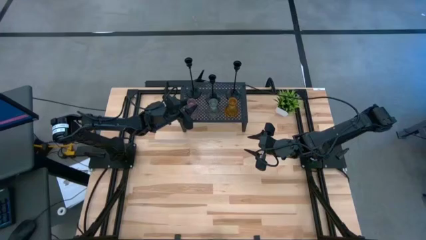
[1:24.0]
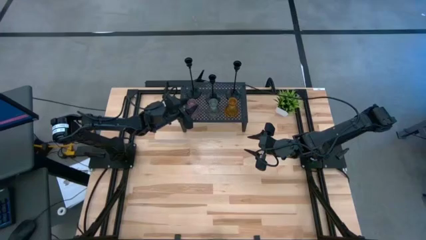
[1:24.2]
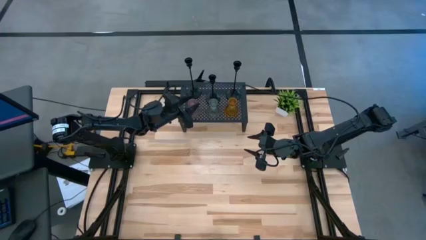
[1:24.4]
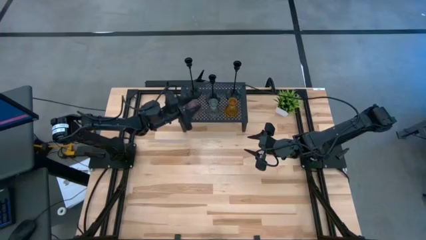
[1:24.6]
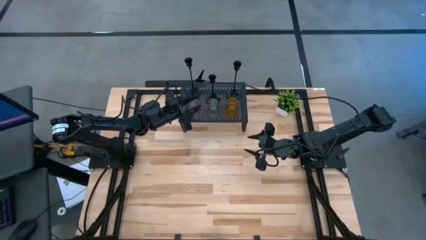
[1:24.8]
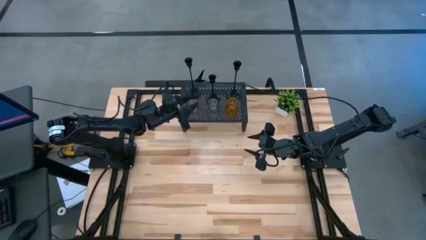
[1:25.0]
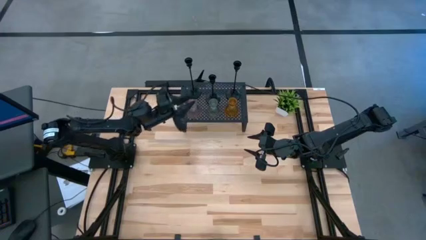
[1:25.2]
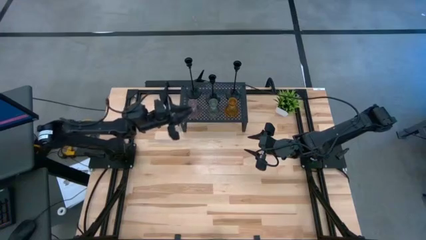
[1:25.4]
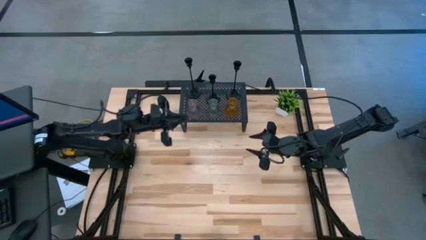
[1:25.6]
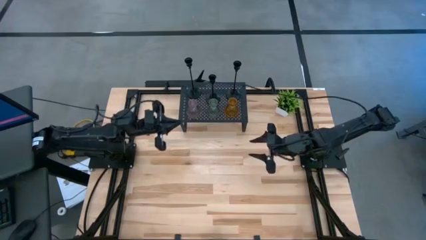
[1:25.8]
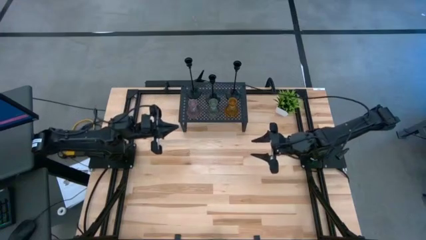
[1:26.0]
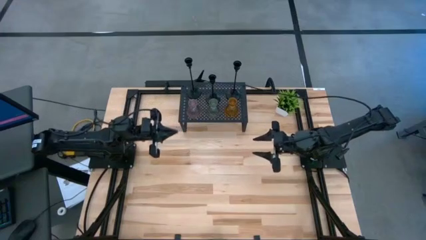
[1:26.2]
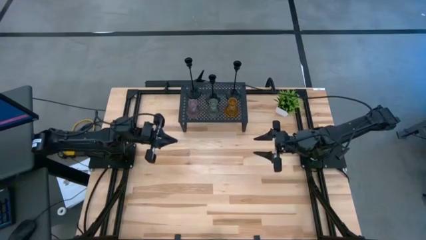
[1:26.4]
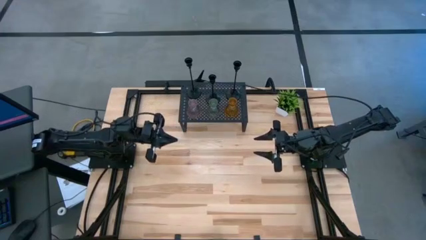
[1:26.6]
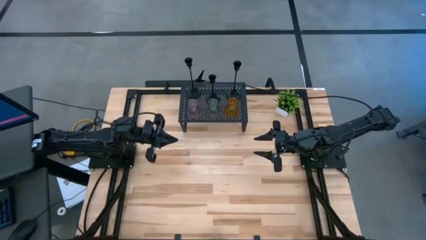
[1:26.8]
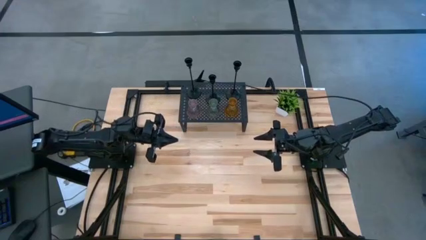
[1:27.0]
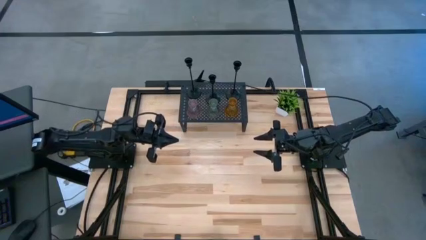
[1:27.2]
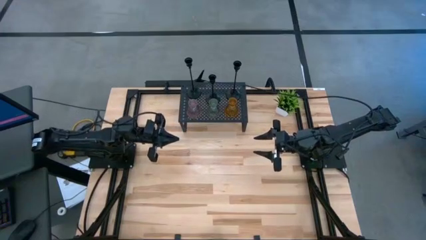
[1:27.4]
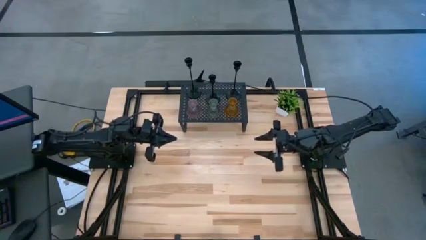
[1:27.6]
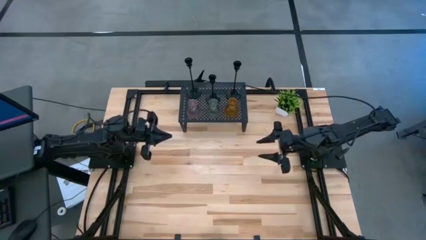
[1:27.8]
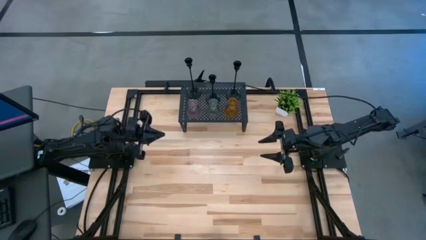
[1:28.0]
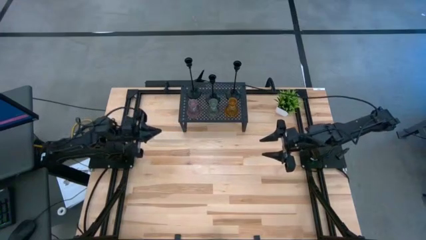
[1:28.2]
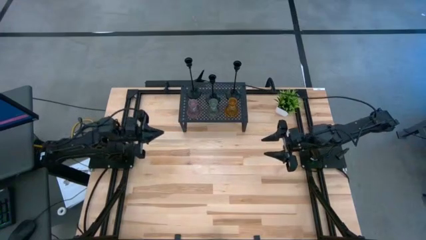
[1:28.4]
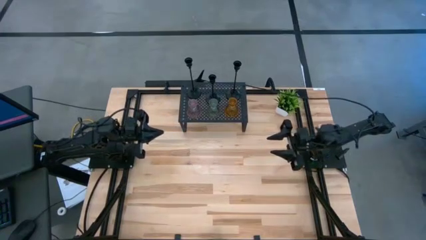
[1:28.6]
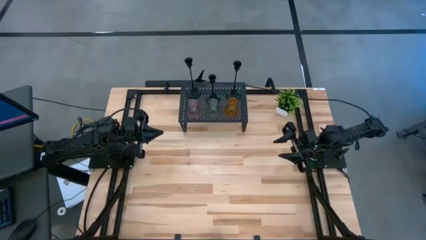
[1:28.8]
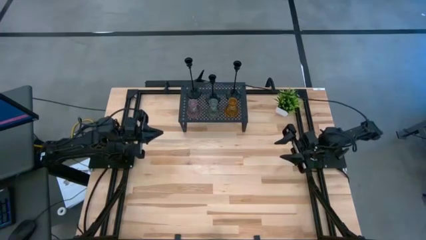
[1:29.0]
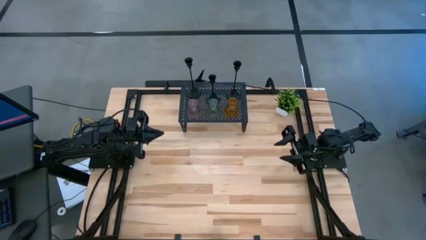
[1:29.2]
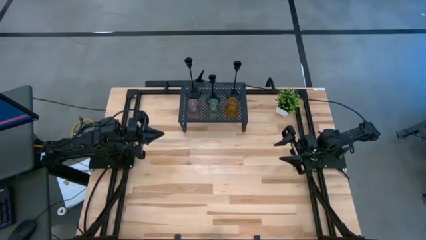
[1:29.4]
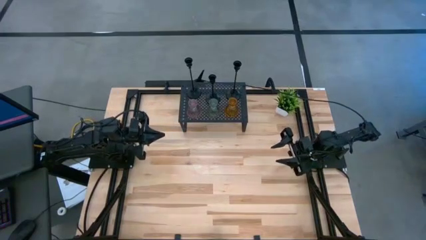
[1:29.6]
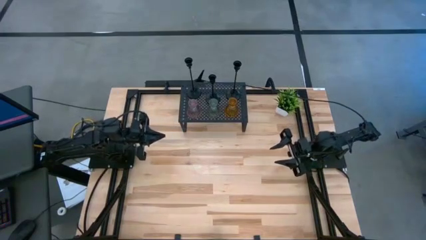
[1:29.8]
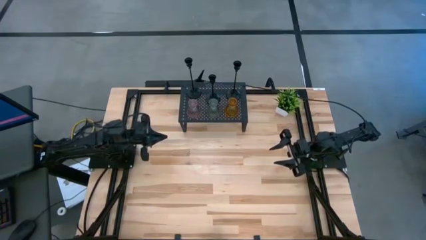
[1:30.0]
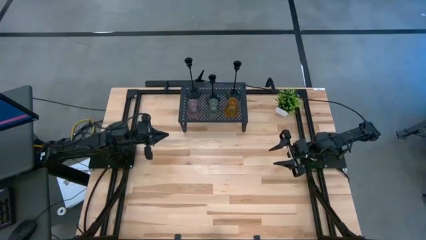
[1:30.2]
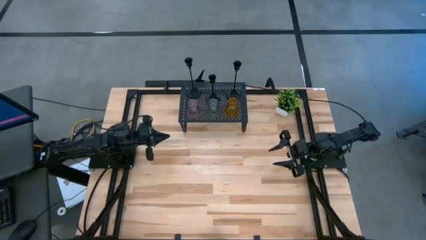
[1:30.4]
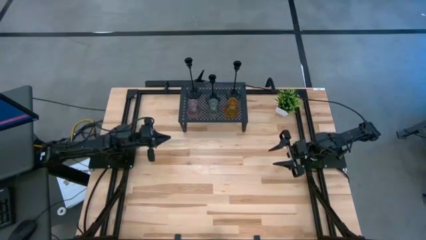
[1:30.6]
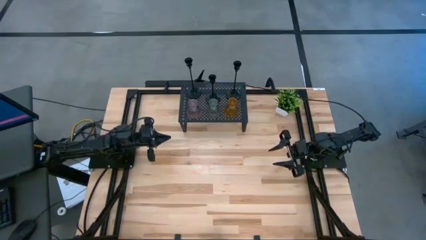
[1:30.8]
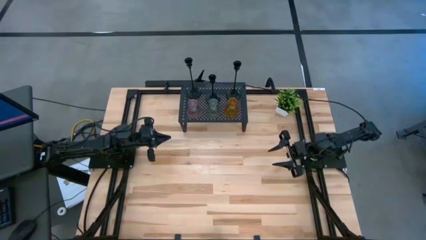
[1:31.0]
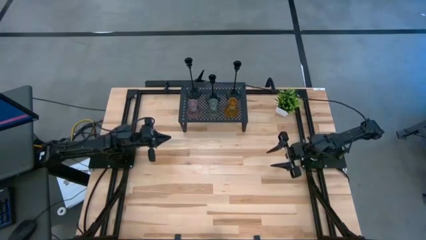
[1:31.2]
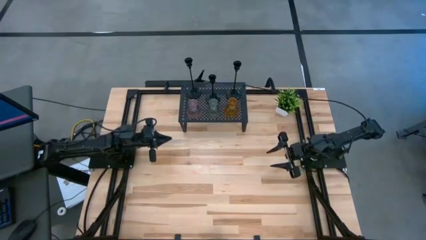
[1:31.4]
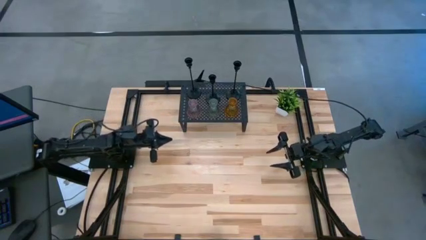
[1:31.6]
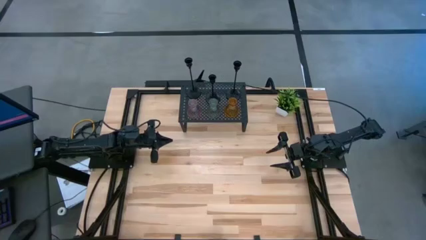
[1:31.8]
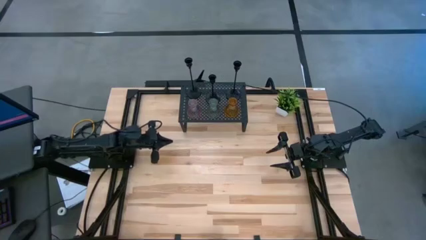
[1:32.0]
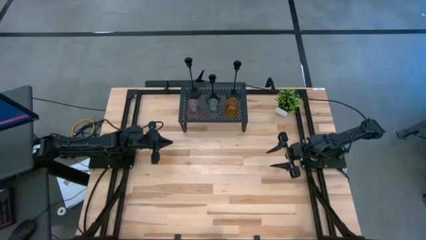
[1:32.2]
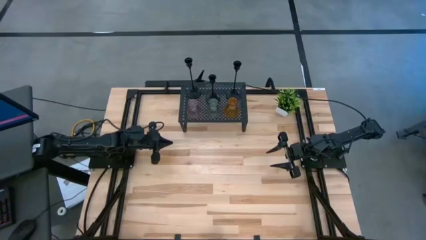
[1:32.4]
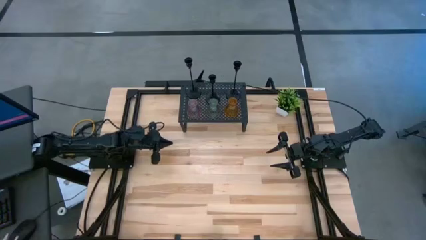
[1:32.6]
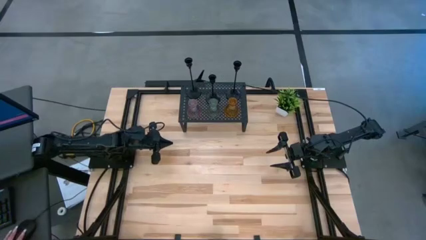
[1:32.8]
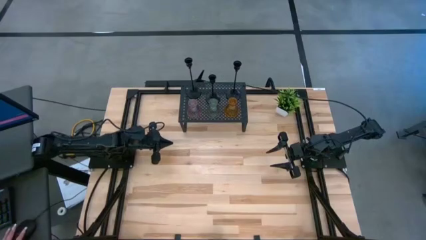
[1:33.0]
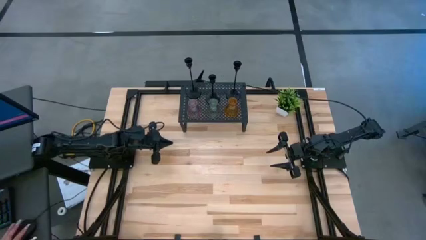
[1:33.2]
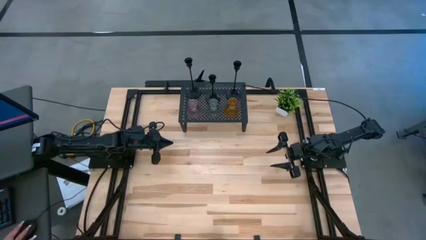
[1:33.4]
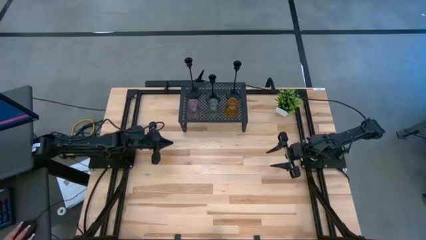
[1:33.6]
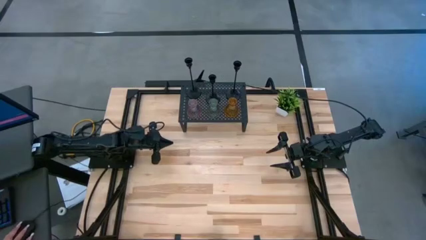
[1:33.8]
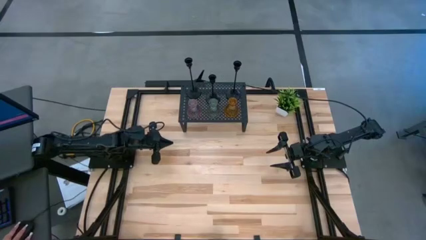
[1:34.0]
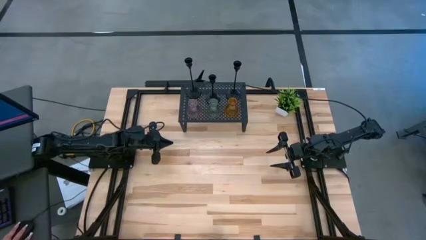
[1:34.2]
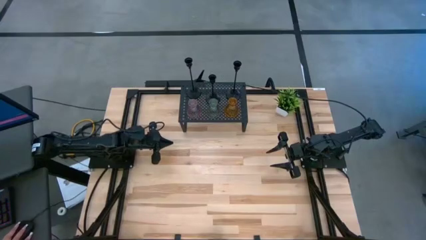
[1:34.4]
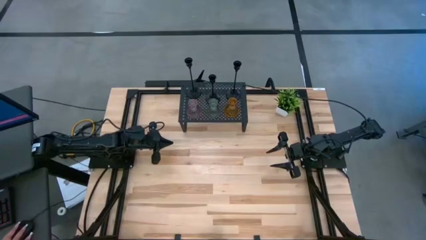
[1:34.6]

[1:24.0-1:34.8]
Task: Pick & Place candle stick holders
Return to Home Position

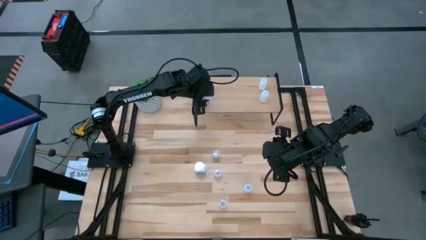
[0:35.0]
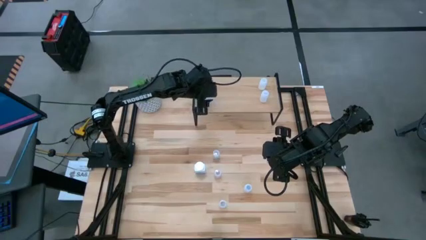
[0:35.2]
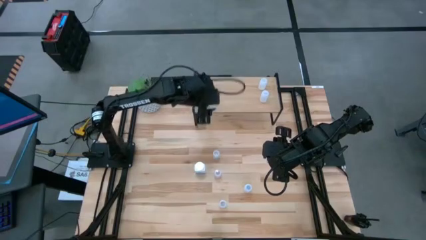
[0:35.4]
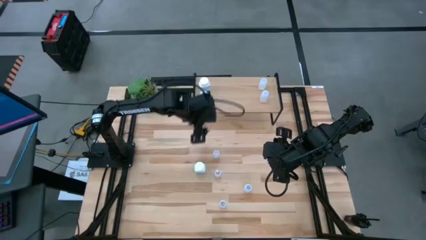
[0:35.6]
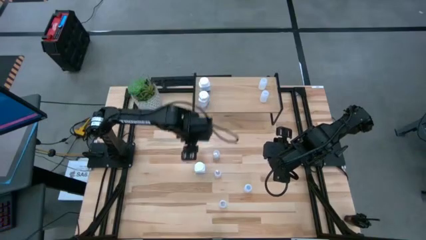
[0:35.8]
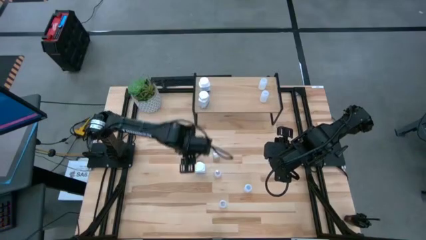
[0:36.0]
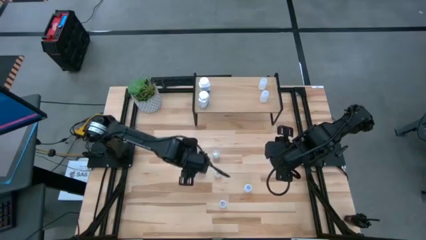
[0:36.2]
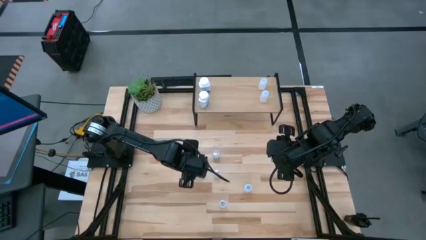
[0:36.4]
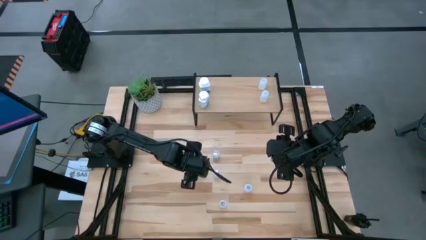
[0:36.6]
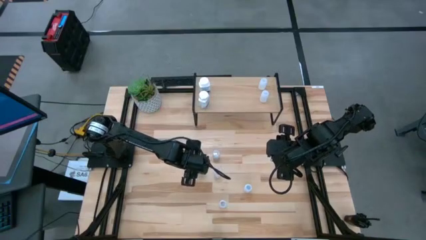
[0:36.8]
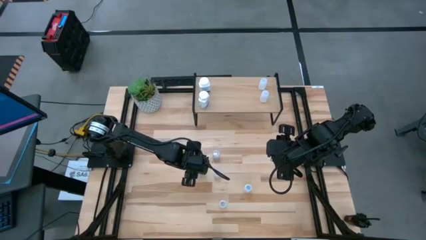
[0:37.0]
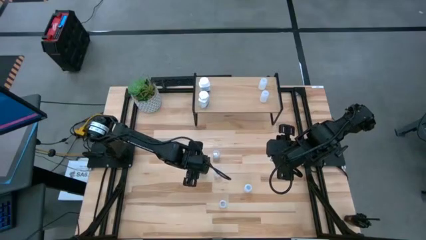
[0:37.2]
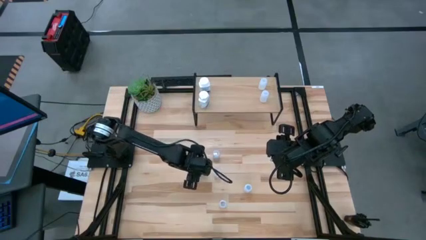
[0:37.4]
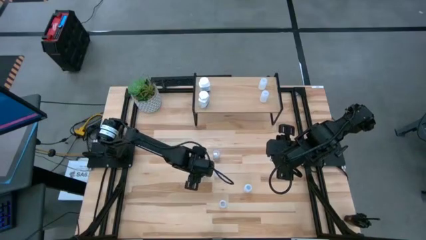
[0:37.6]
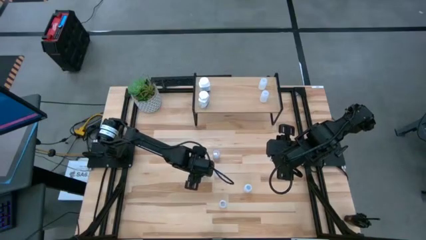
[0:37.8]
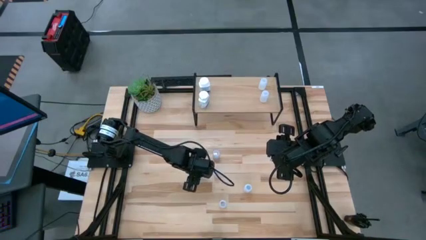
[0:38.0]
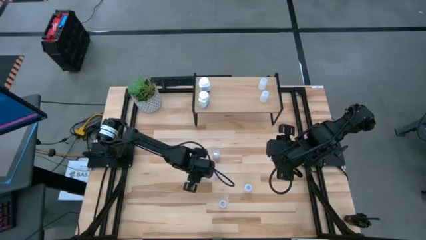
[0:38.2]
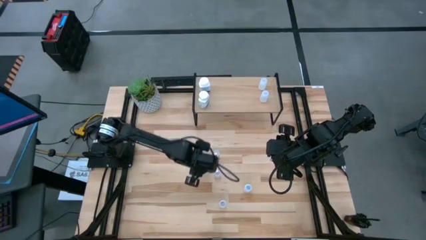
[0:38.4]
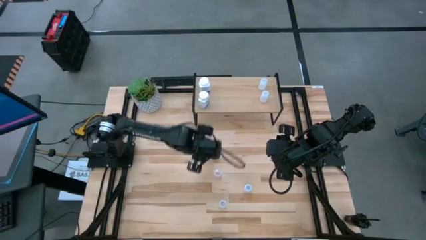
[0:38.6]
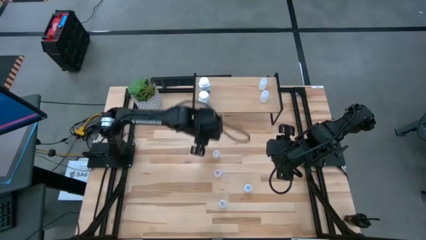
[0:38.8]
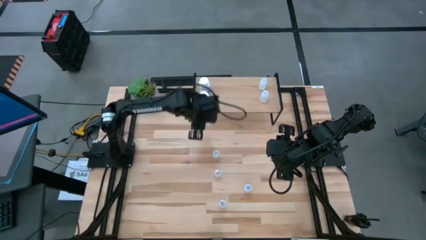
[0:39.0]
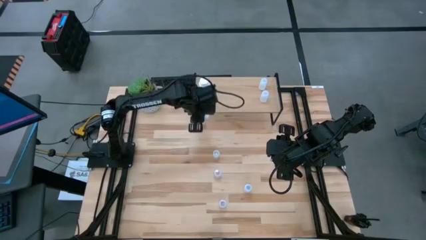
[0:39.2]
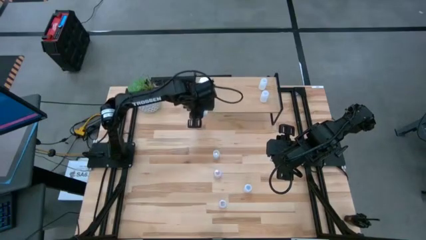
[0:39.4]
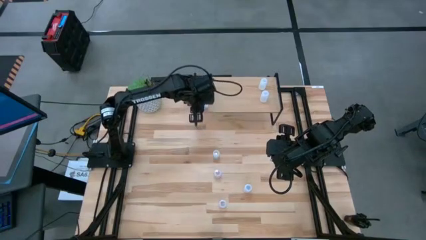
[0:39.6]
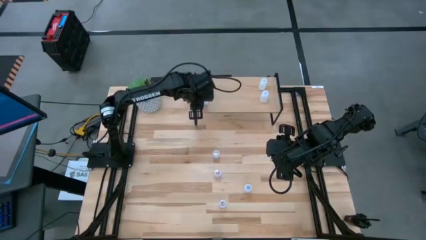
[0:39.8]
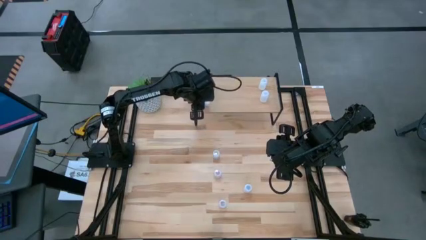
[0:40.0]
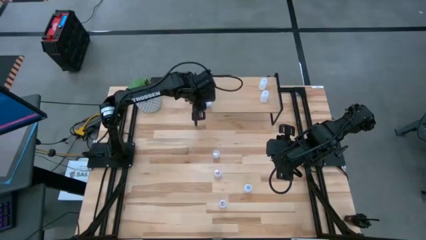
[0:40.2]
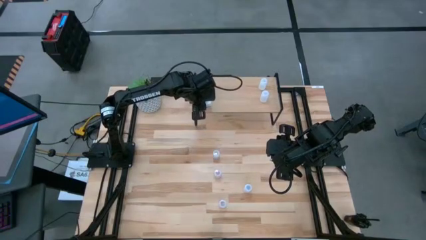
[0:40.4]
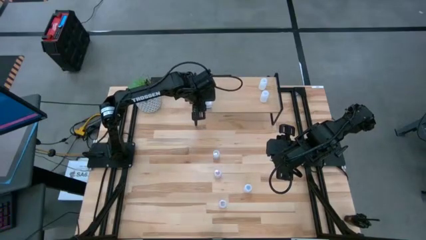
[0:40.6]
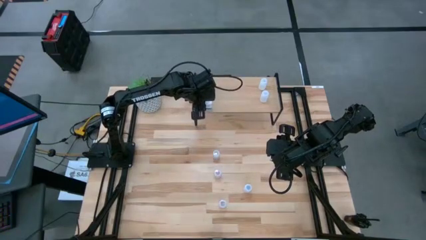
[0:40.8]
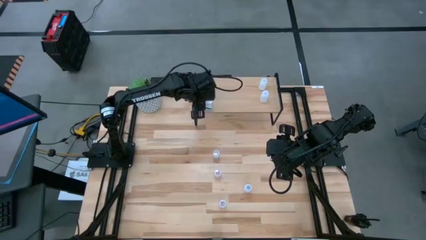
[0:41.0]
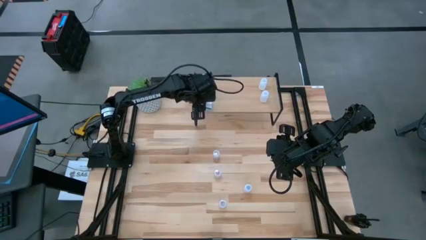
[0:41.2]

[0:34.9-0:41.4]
Task: Pick and place medicine bottles onto shelf by color
Put the big white pill bottle on the shelf aligned with the other big white pill bottles
